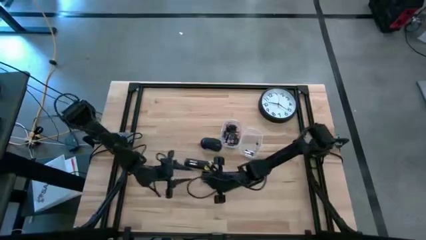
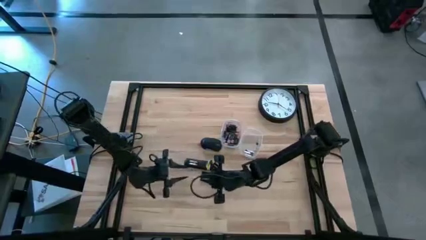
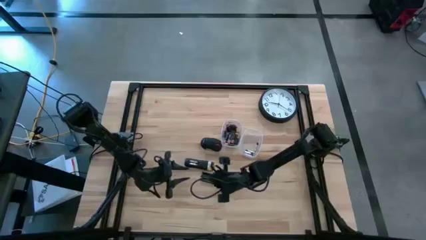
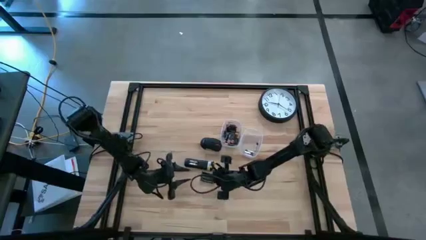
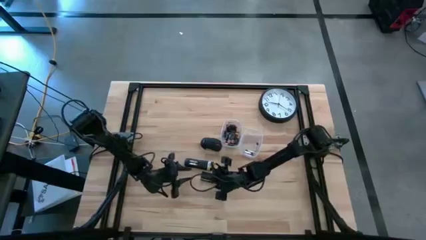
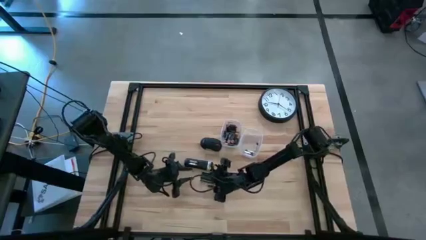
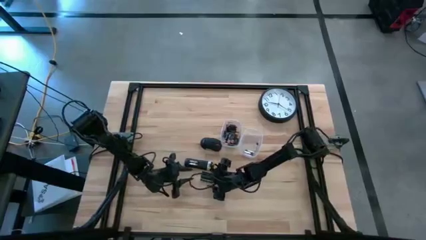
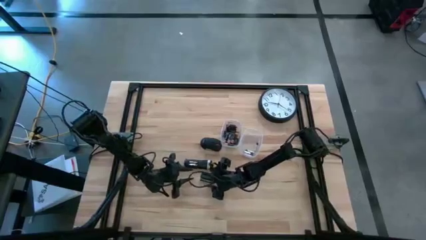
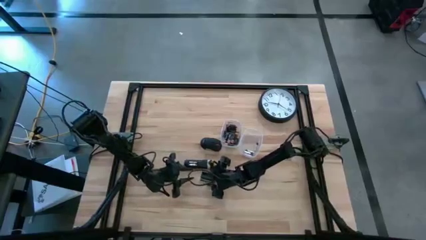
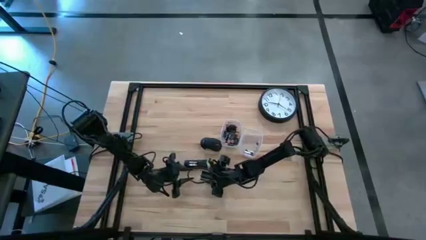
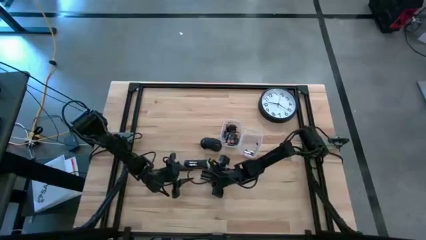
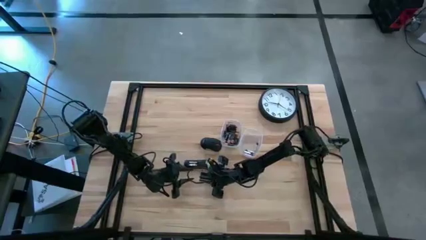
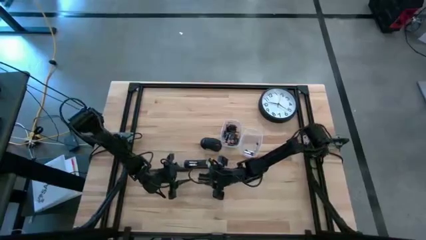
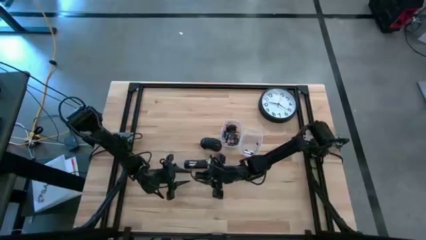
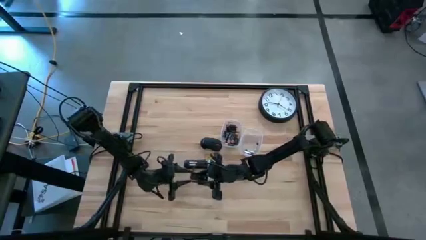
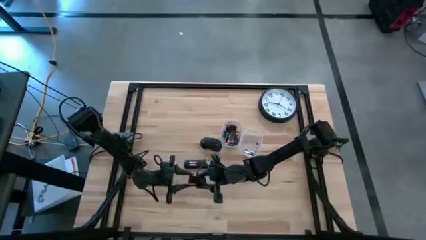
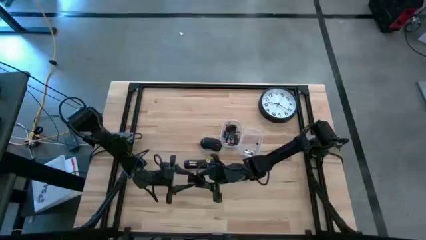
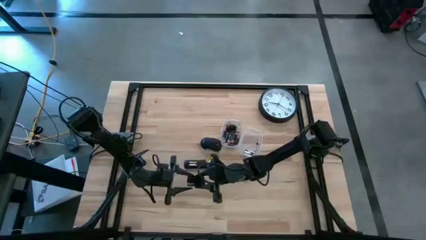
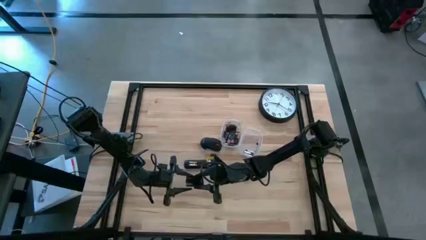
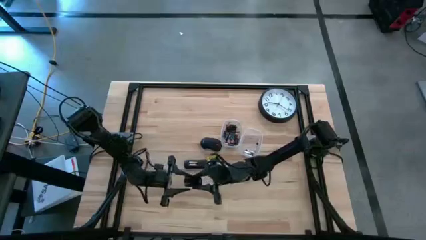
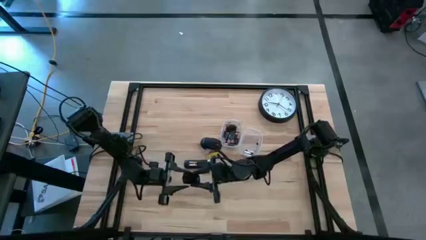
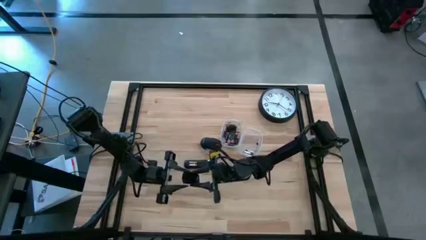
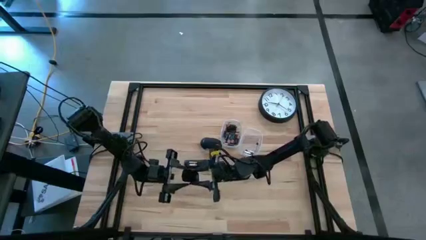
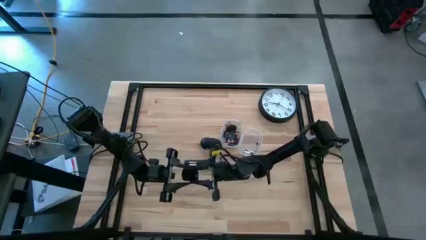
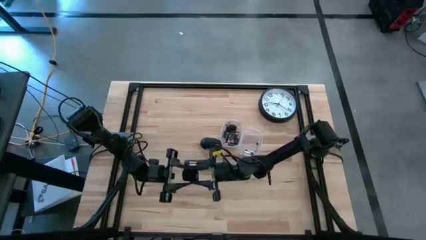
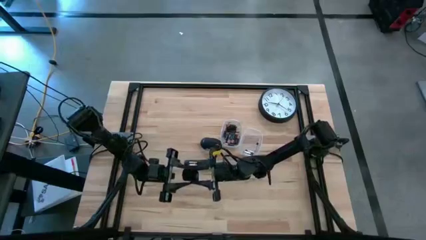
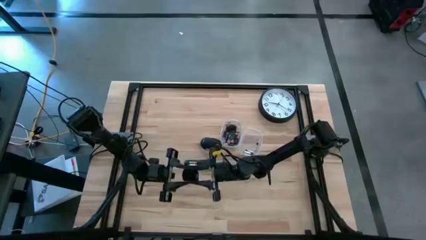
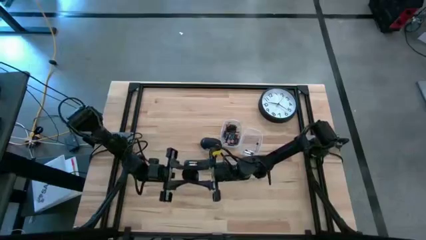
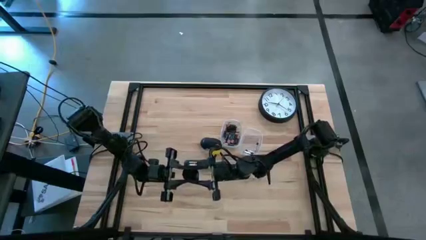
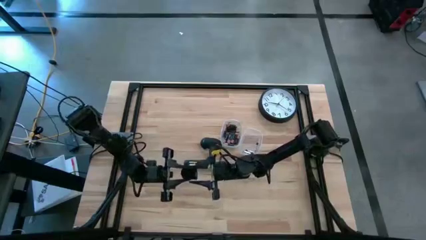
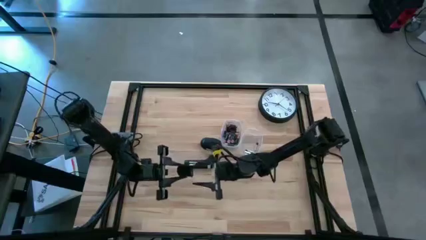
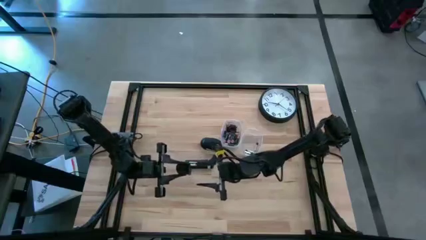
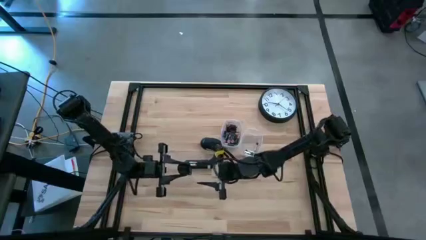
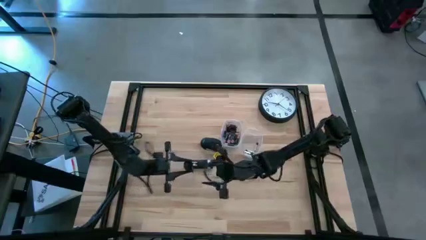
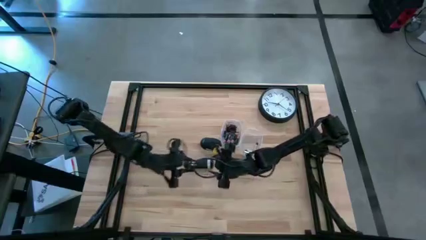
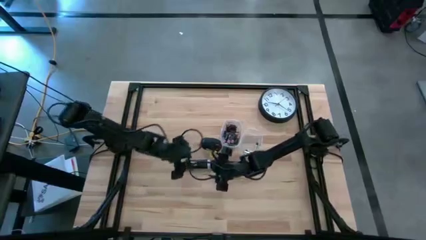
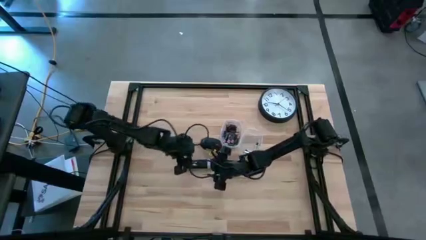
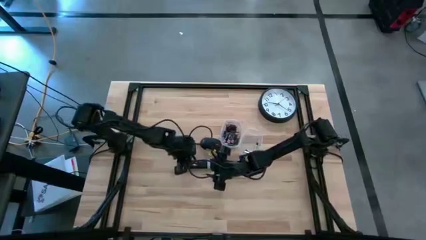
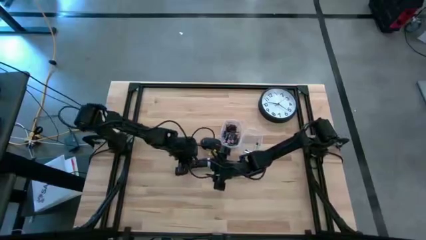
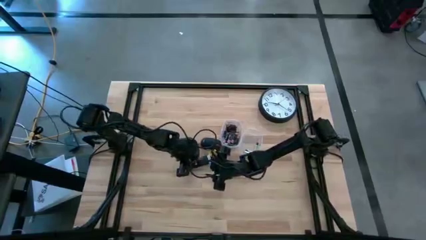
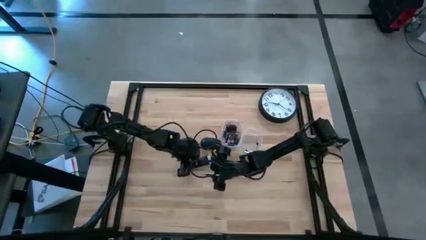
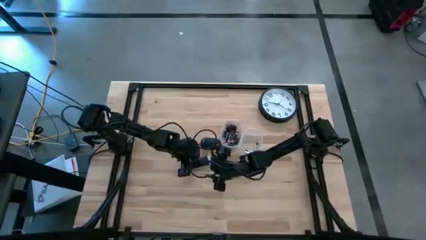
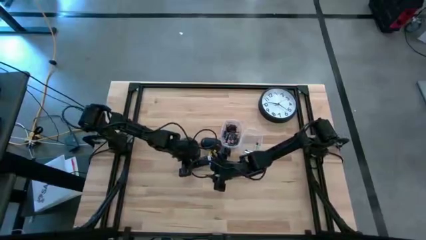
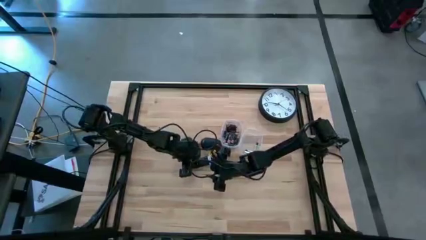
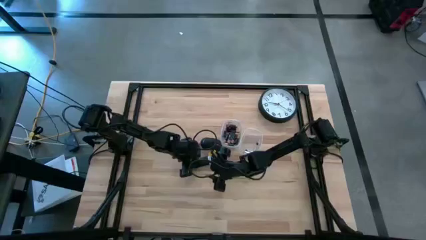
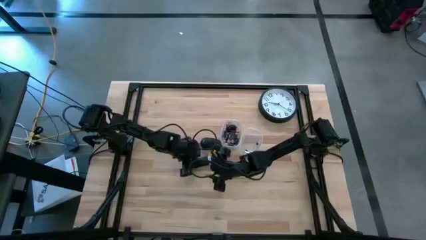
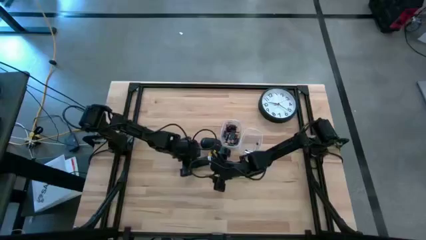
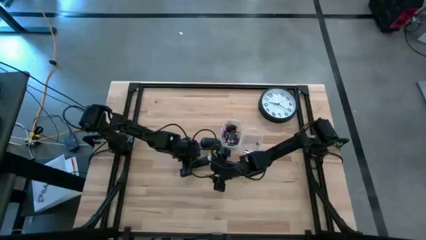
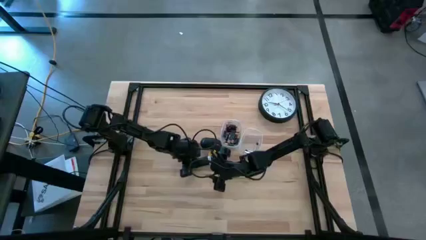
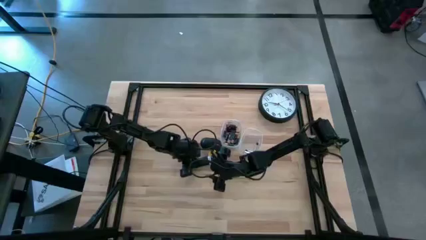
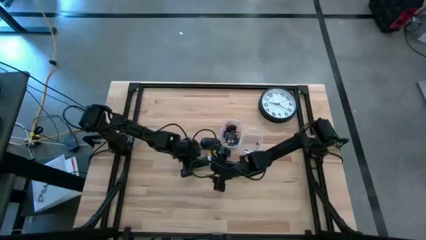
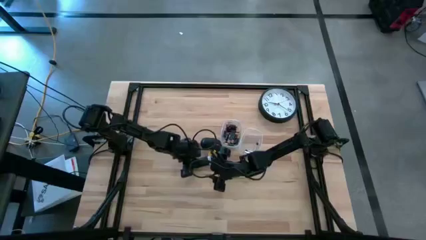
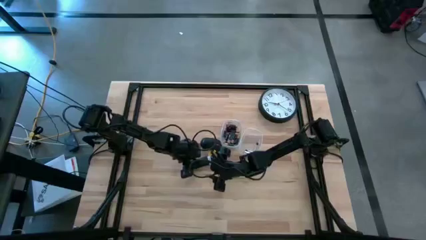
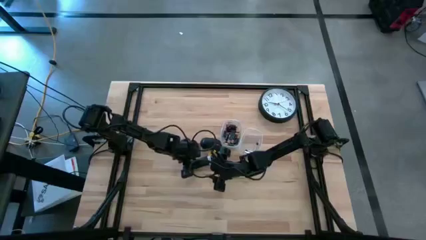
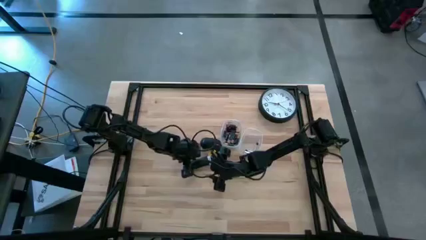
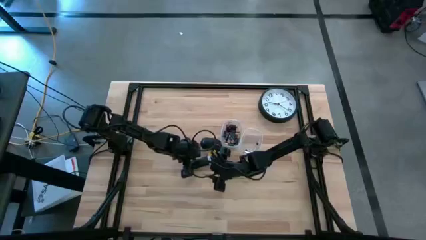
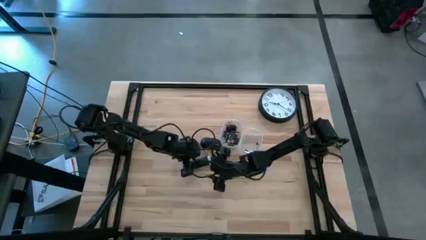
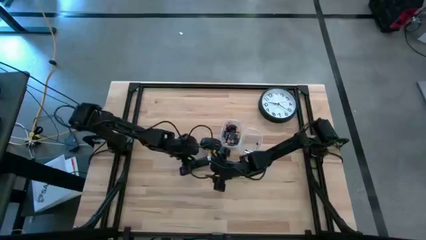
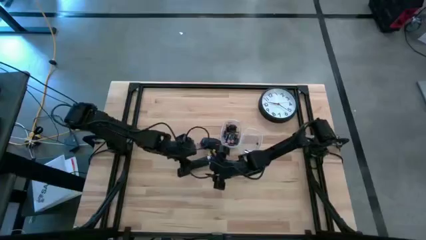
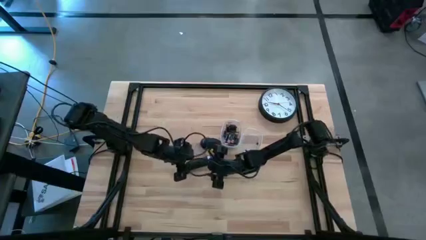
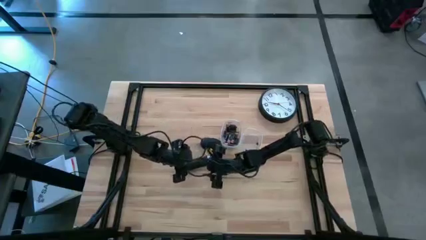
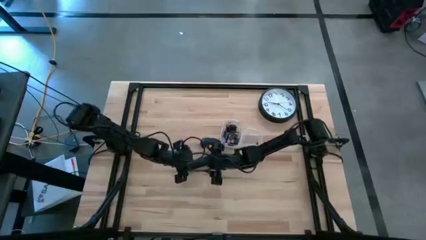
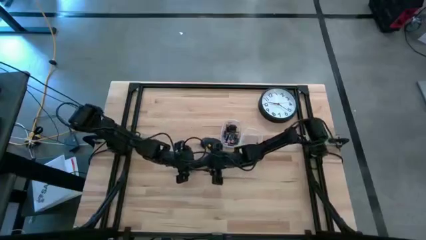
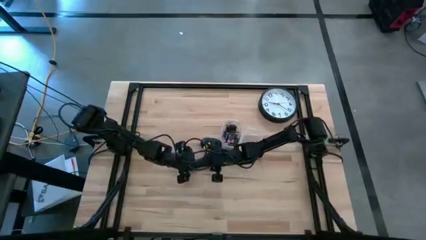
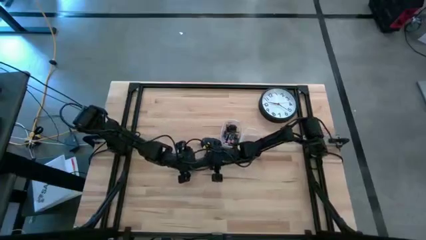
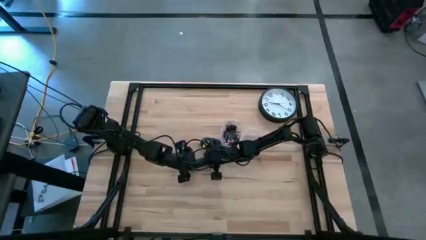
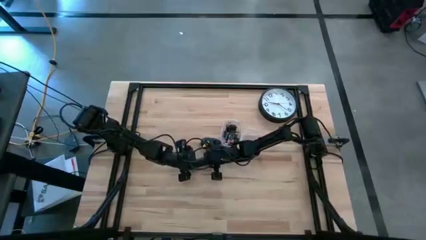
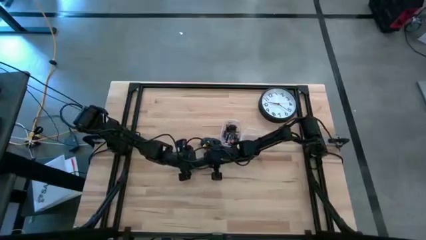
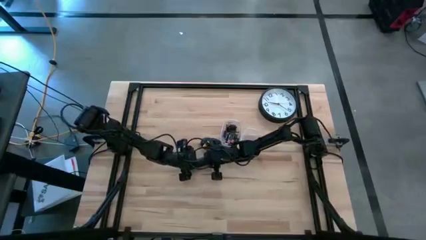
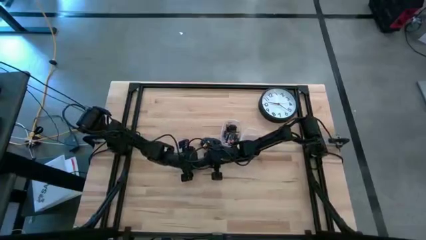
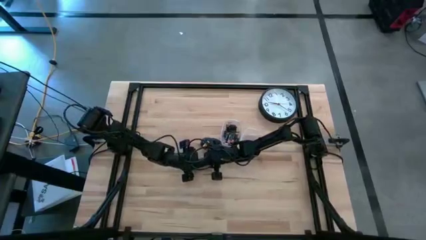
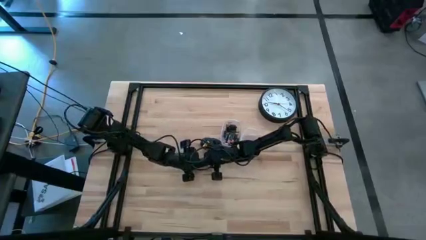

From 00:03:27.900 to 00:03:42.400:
Task: Insert battery
Close the black cover

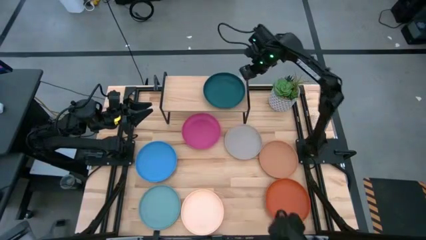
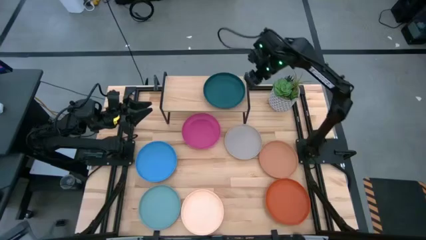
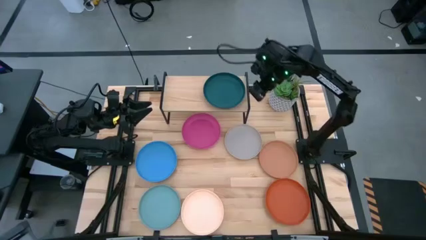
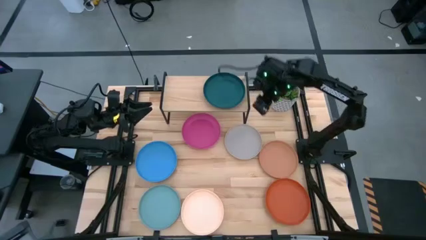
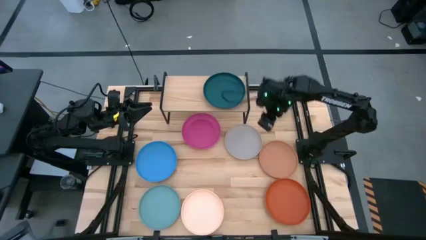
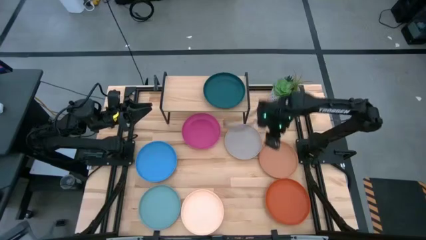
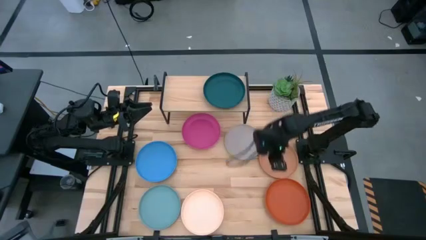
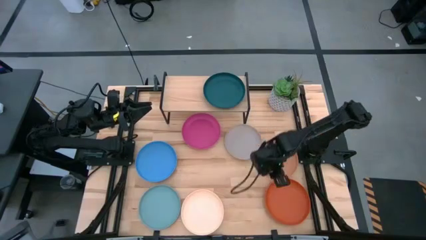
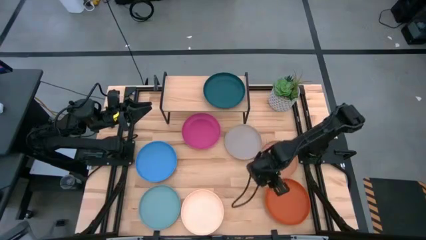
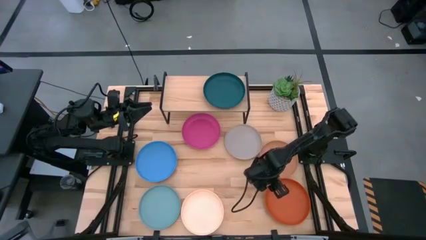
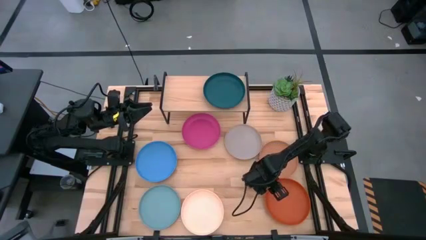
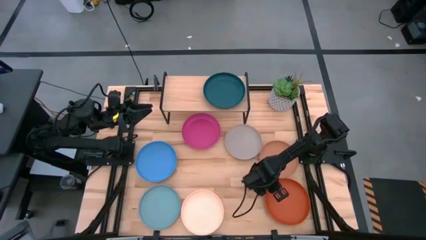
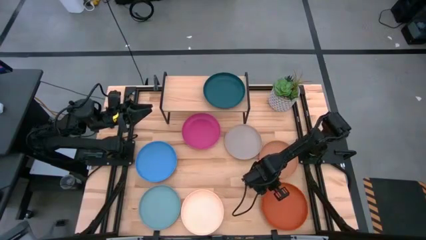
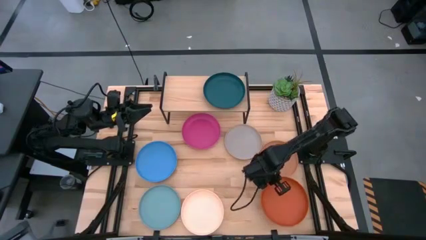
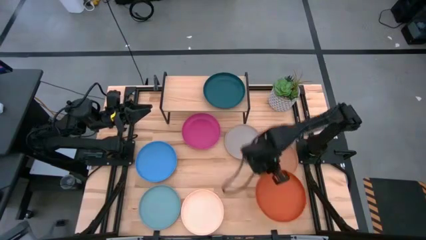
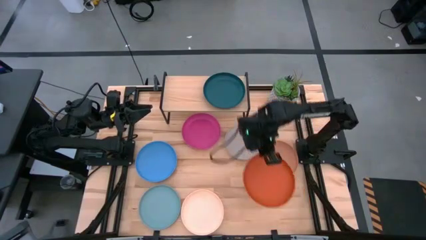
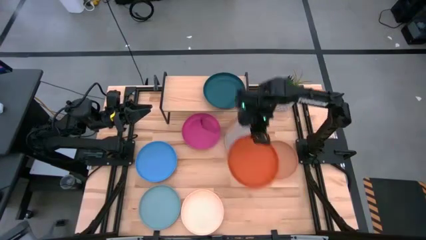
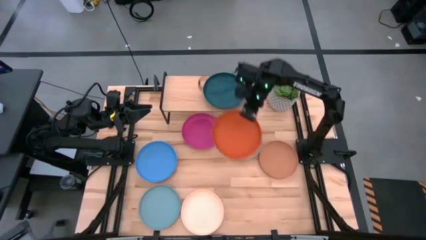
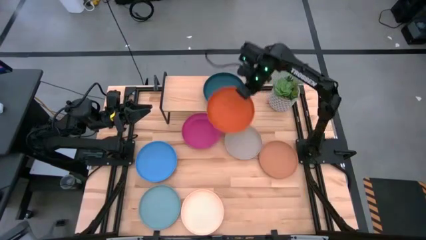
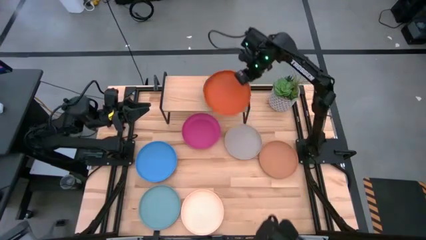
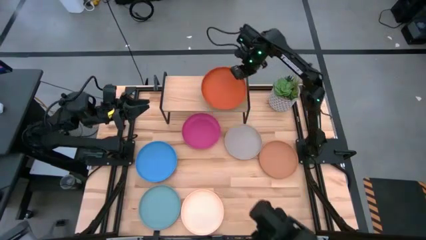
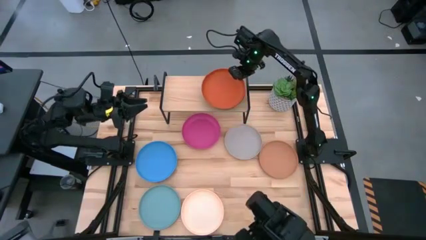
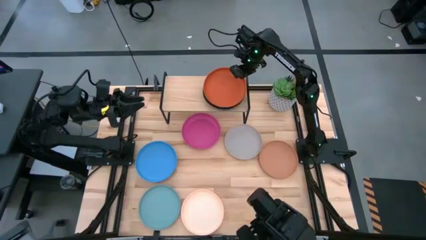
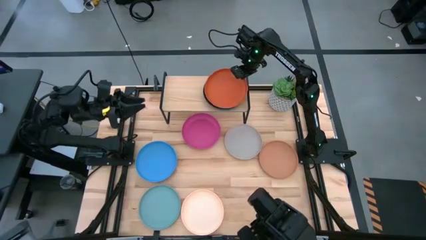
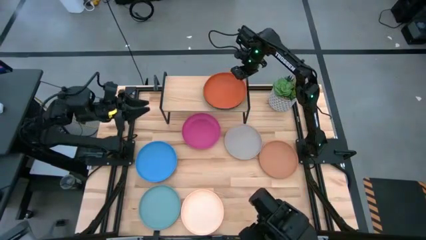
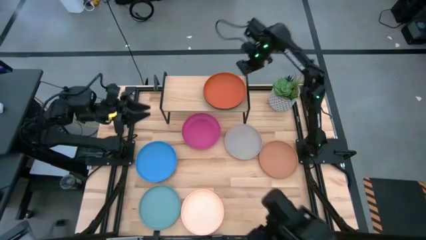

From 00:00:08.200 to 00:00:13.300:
Task: Place and stack plates onto a shelf
Stack the orange plate on the dark green plate on the shelf
